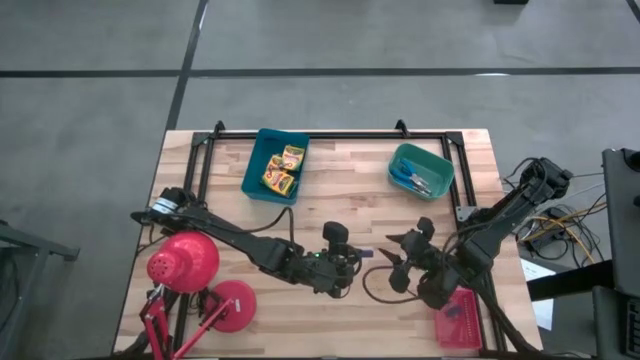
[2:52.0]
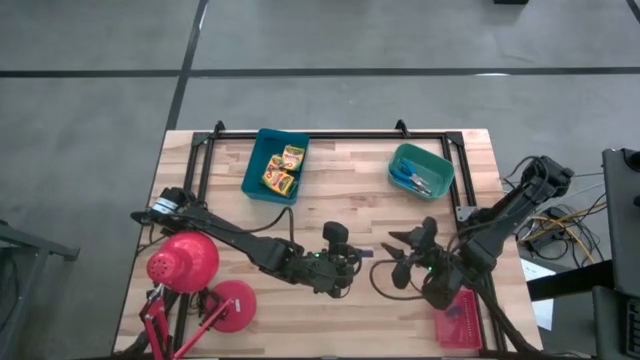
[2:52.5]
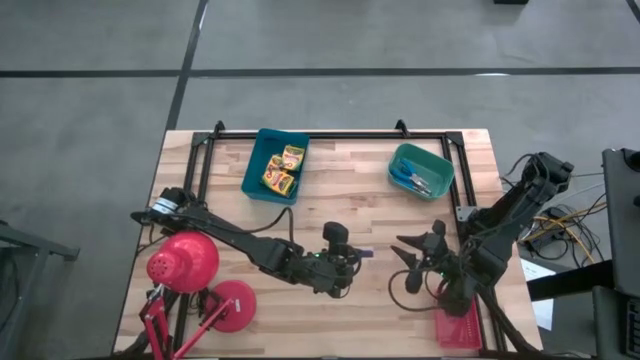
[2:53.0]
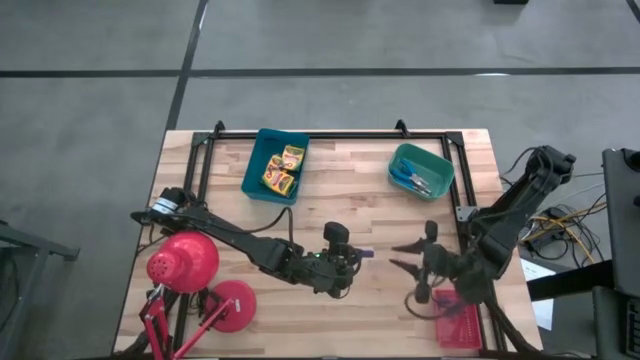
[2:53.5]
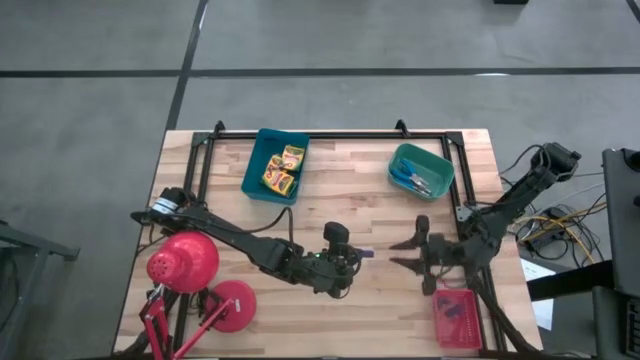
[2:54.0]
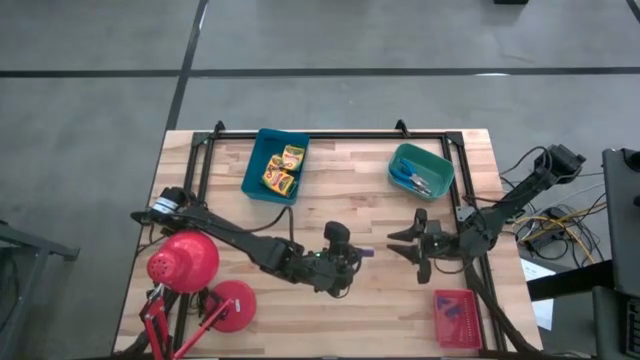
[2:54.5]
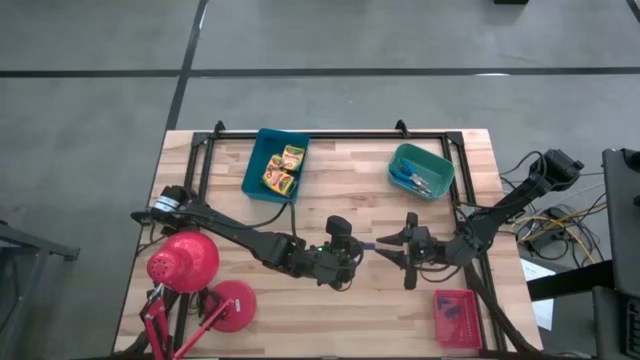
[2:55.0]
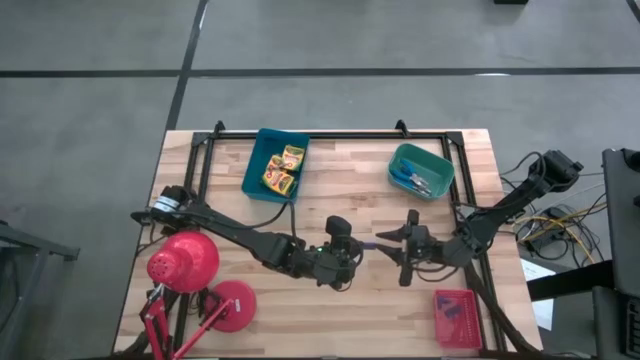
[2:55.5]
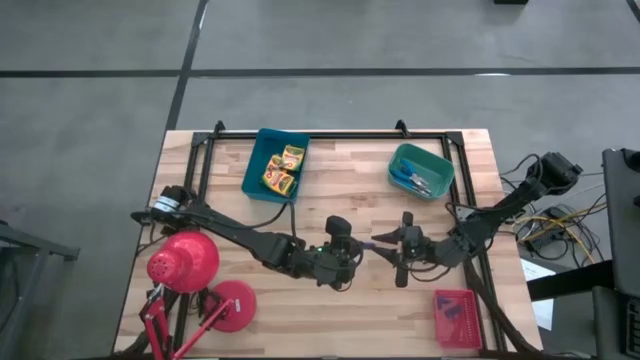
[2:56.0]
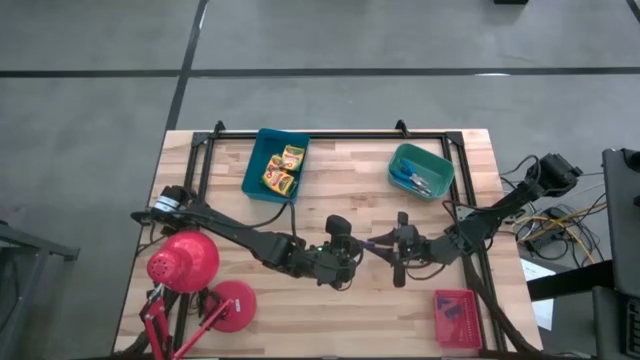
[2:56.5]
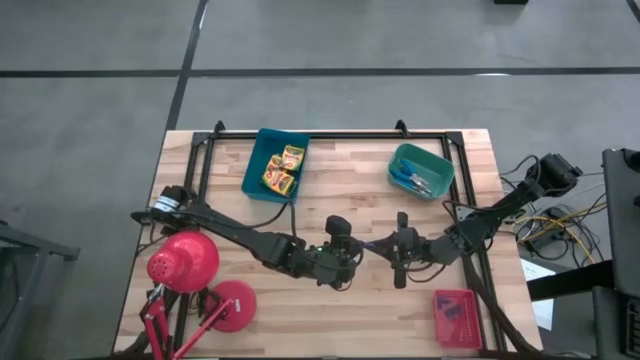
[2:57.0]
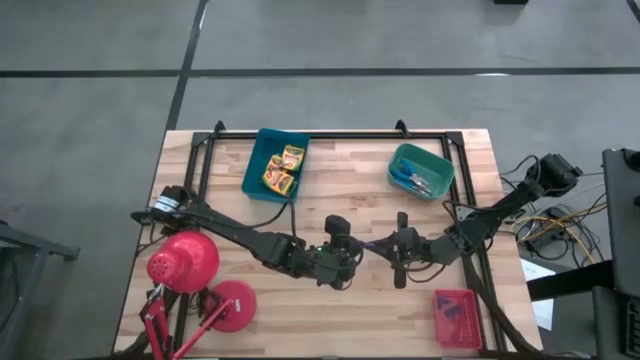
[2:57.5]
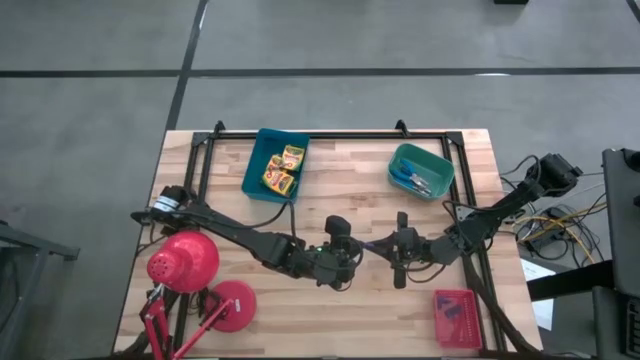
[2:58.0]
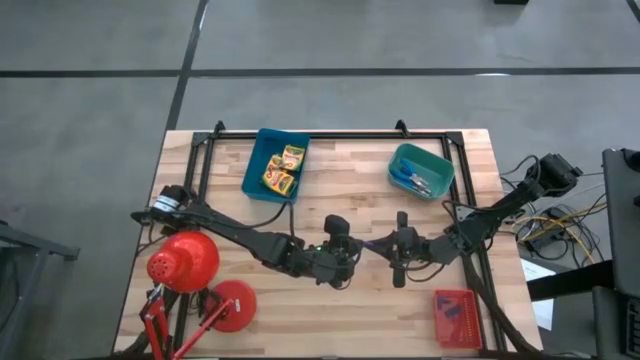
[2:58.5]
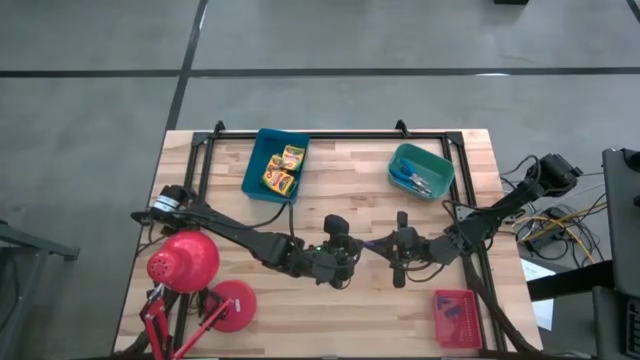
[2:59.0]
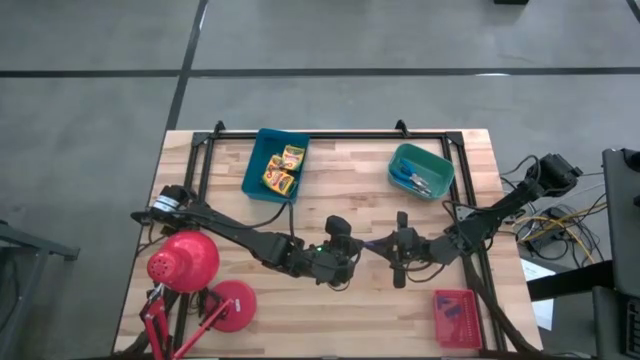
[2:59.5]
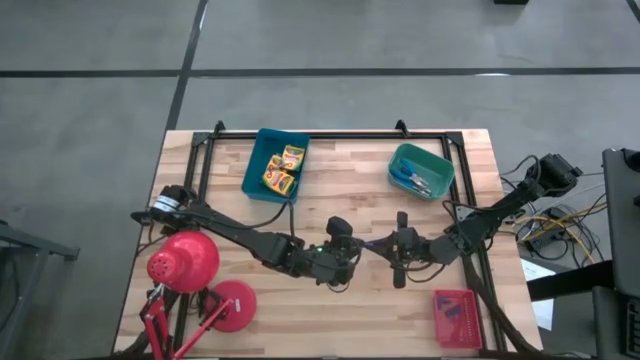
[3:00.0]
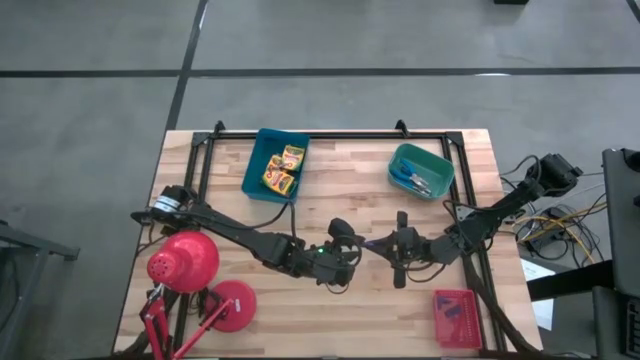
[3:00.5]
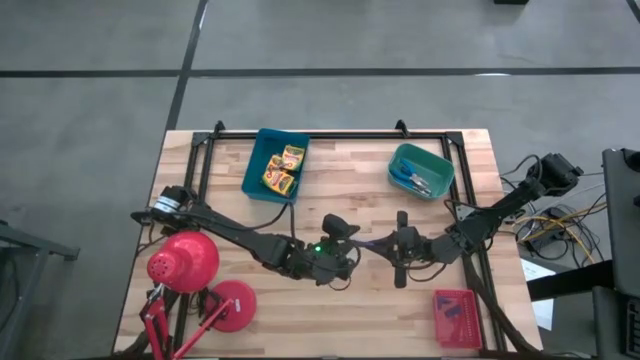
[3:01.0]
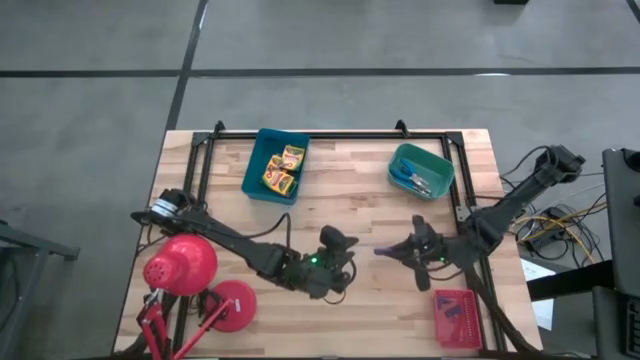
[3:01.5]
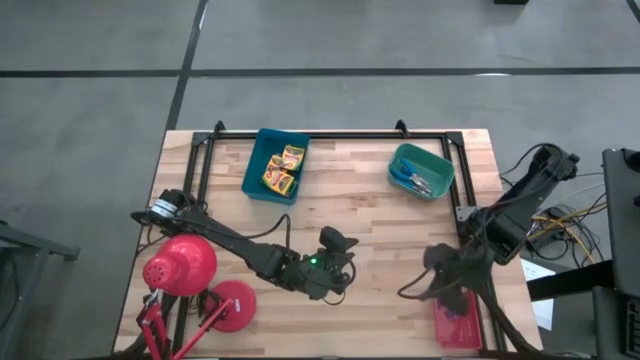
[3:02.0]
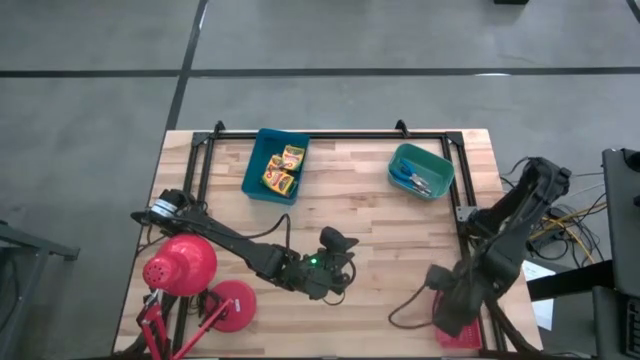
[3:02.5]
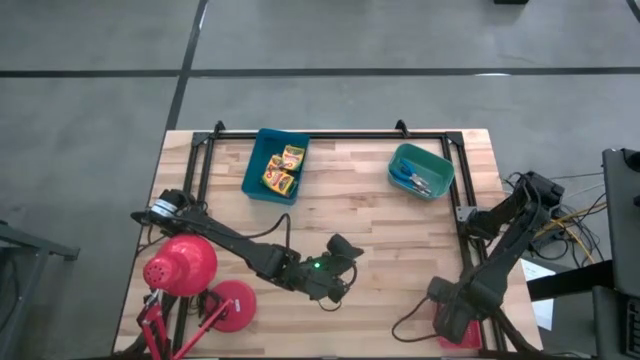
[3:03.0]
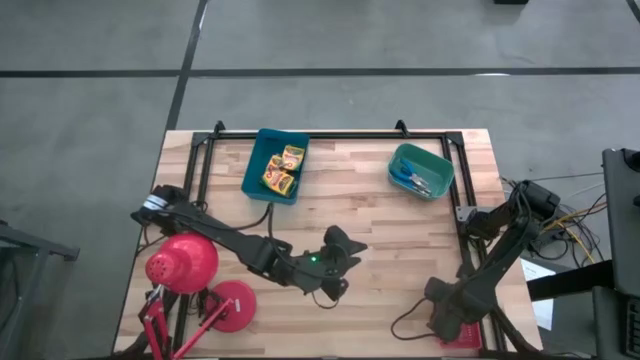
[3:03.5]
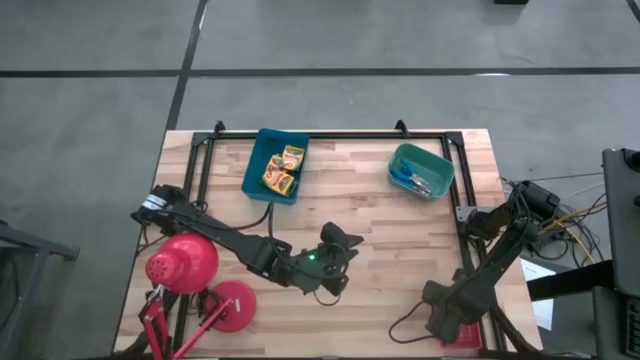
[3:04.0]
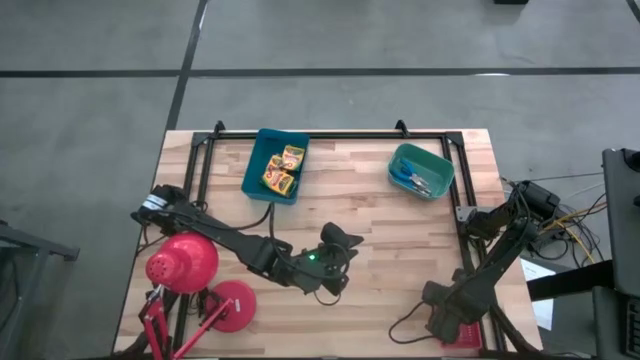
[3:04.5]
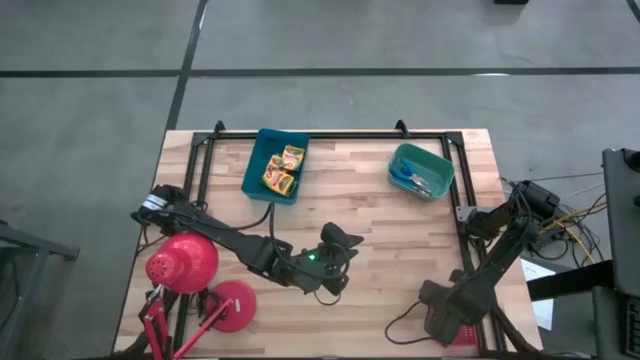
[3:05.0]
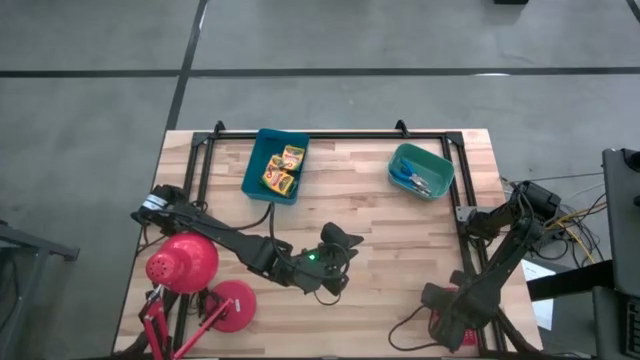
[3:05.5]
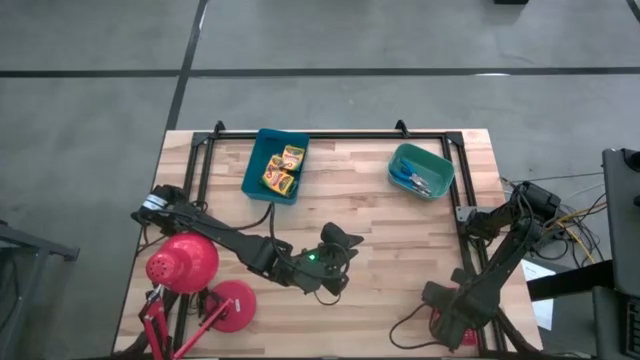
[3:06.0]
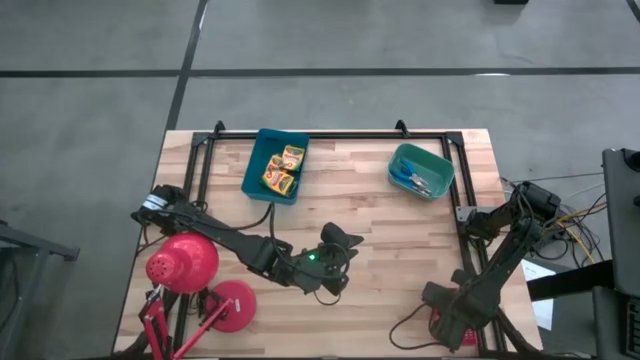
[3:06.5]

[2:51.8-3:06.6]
Task: Pick & Place School Supplies
Put the purple eraser into the red bin

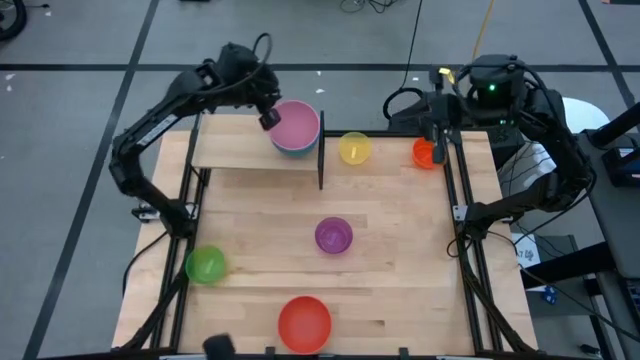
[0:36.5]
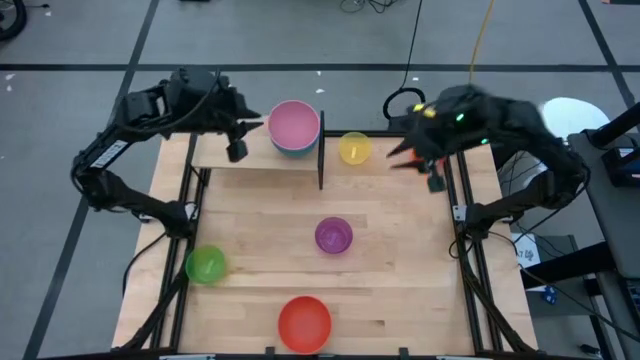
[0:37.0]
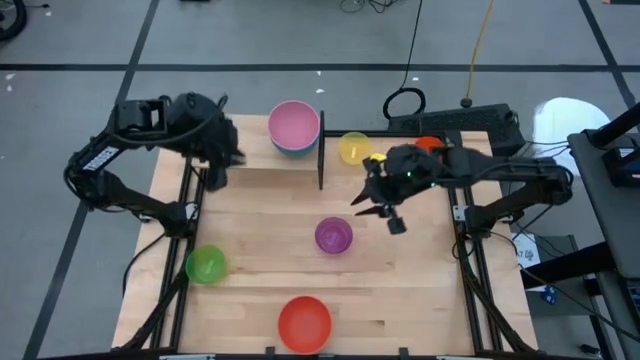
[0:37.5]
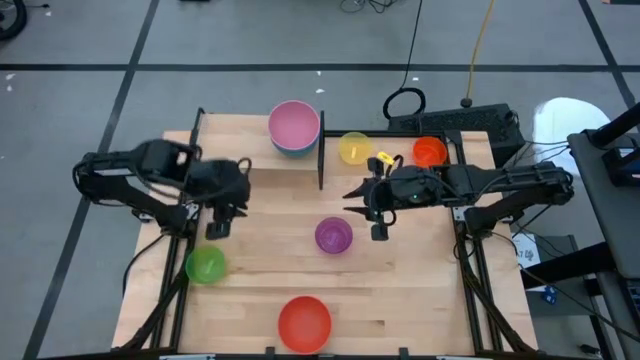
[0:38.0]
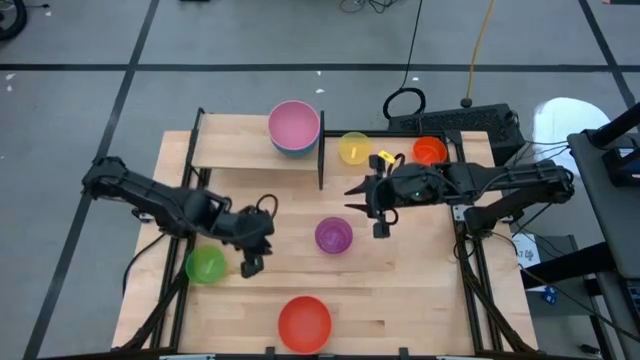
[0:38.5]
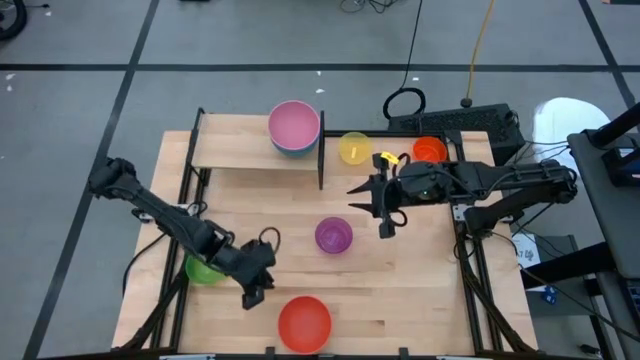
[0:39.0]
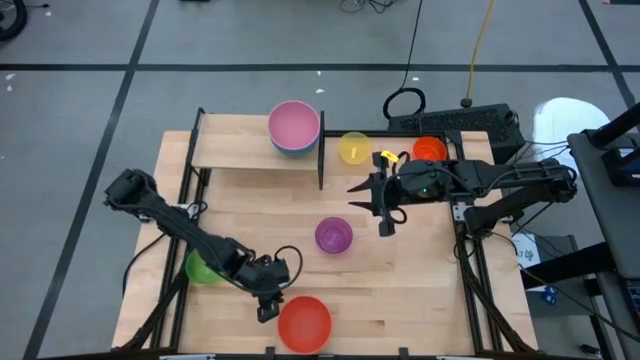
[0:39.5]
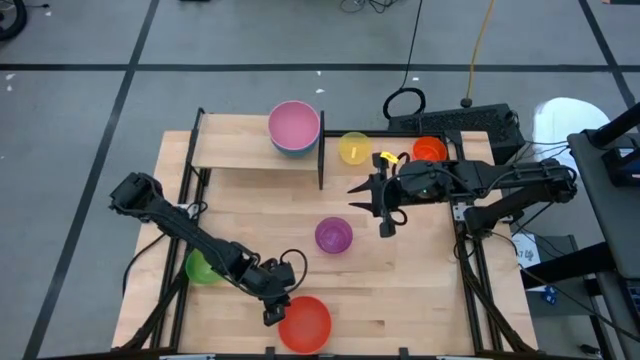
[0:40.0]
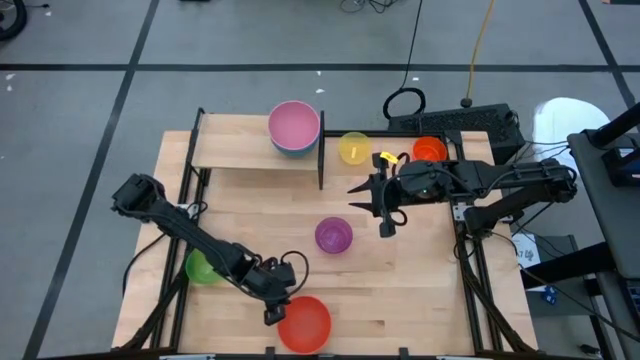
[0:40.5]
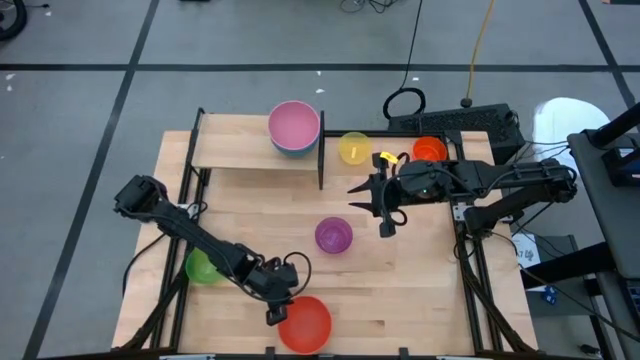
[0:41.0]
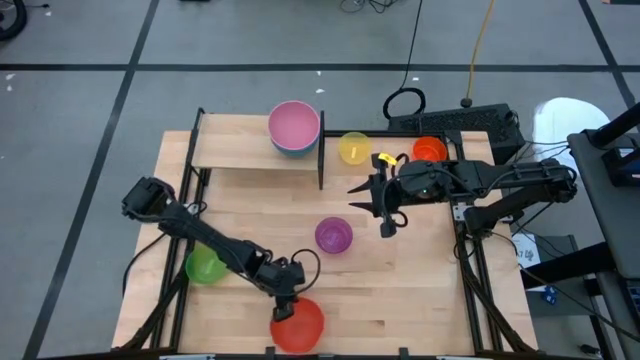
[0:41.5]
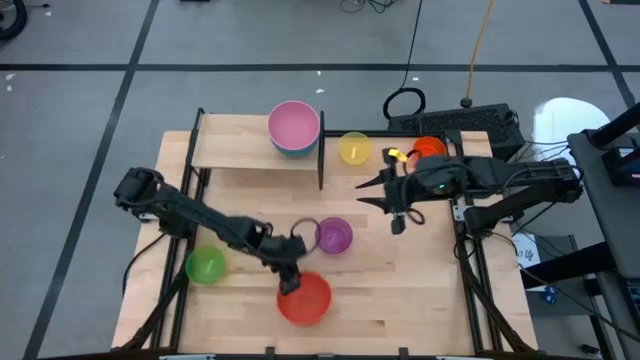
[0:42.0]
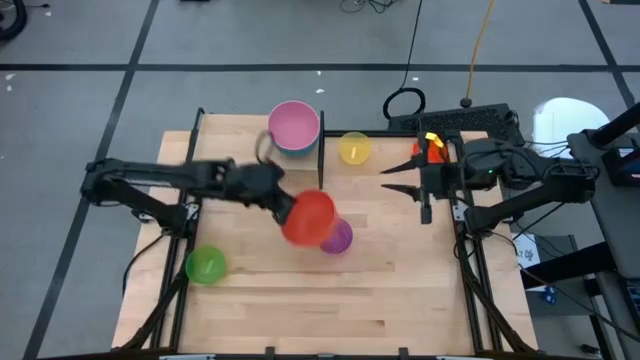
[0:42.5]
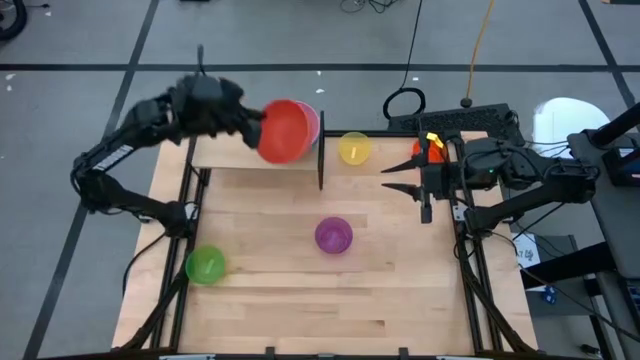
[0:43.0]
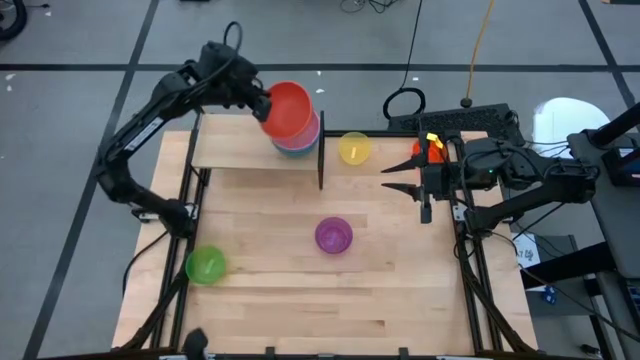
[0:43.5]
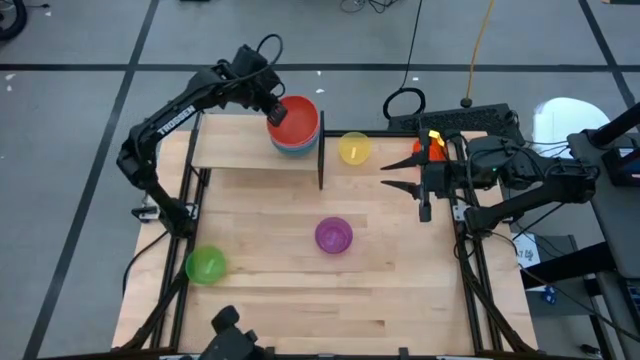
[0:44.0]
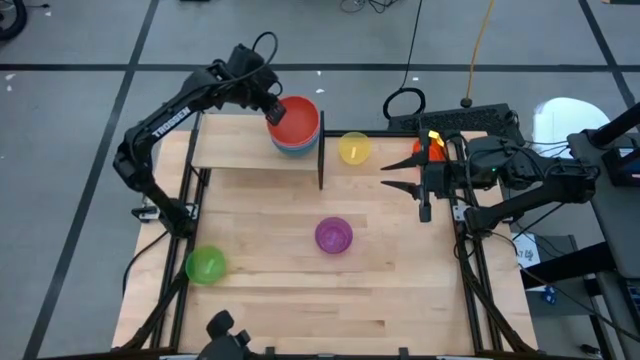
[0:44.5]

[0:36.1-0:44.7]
Task: Place and stack bowls onto a shelf
Stack the orange bowl on top of the pink bowl on the shelf
